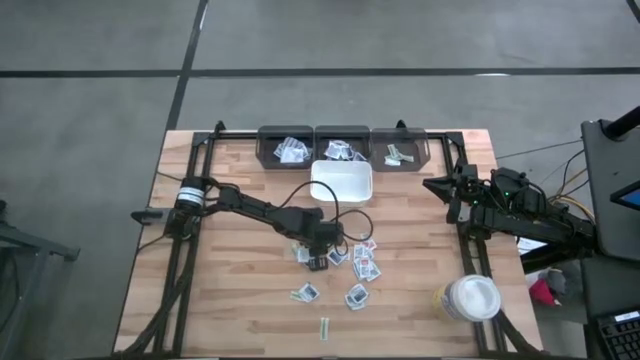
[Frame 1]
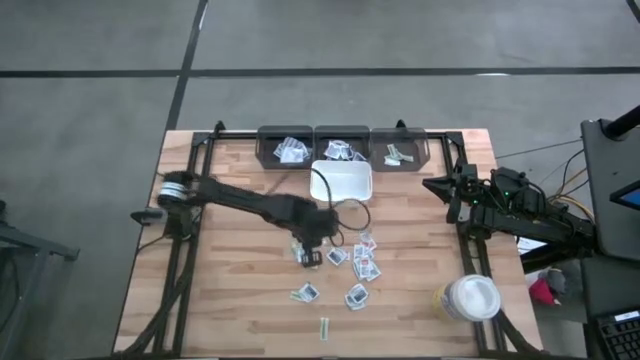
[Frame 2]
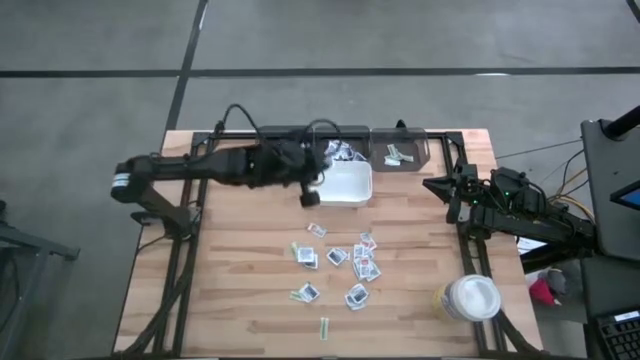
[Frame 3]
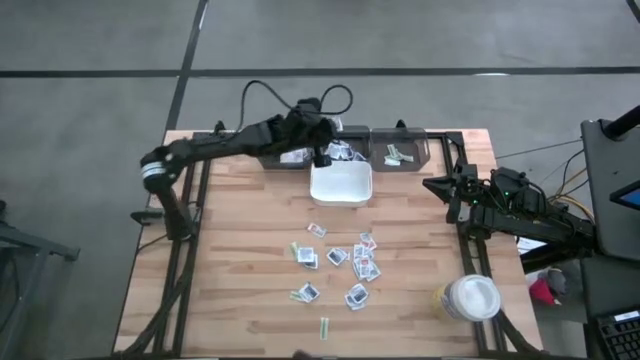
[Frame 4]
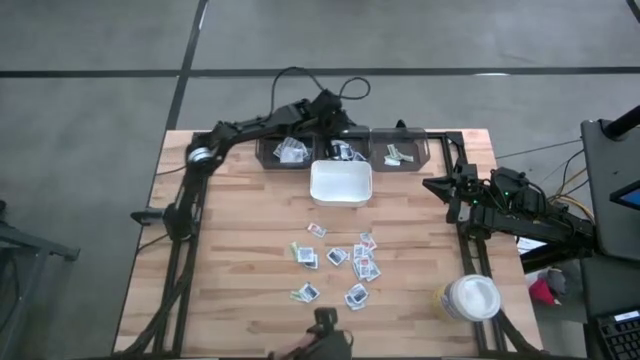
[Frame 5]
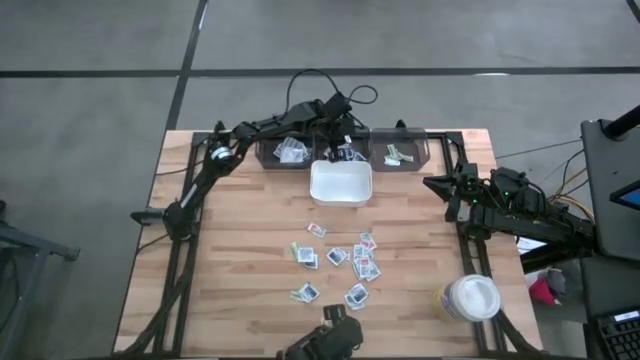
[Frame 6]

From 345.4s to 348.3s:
Task: Pick & Place First Aid Supplies
Put the blue alcohol pad into the middle gray bin

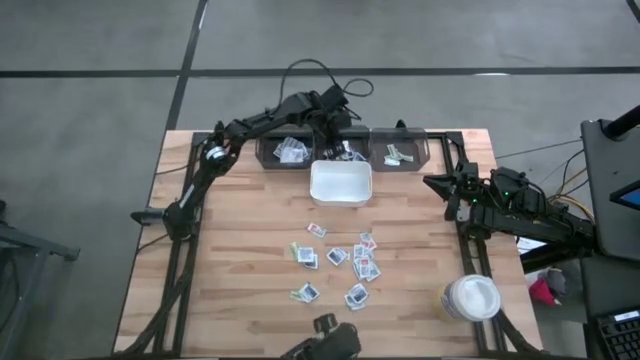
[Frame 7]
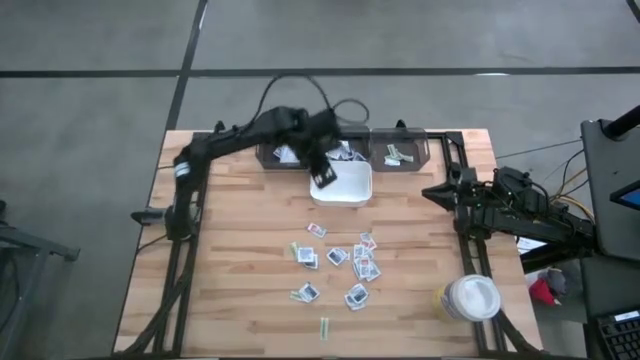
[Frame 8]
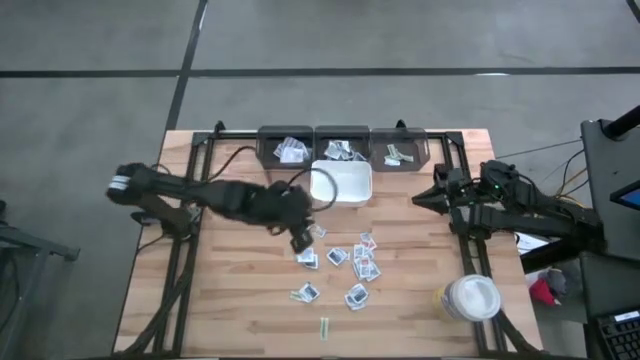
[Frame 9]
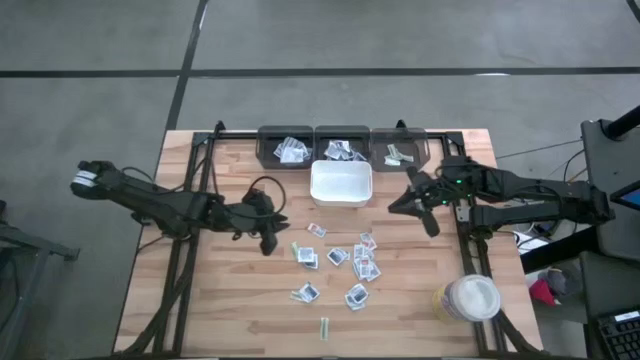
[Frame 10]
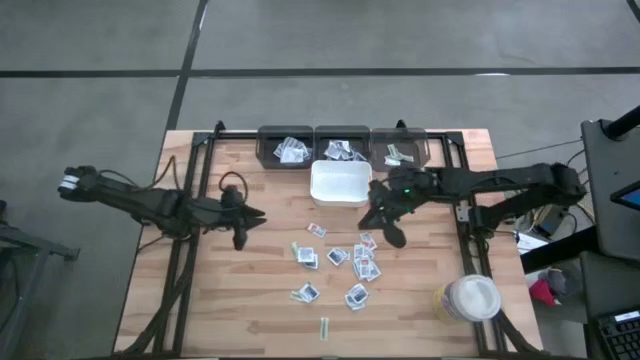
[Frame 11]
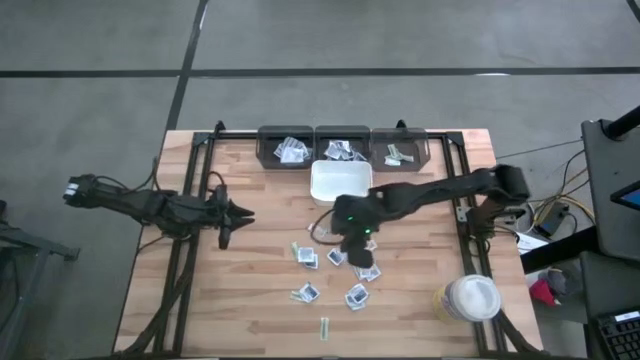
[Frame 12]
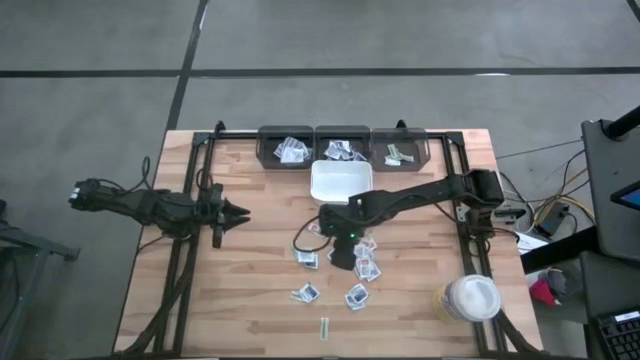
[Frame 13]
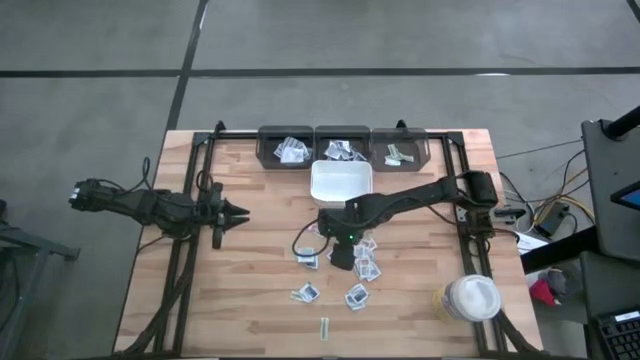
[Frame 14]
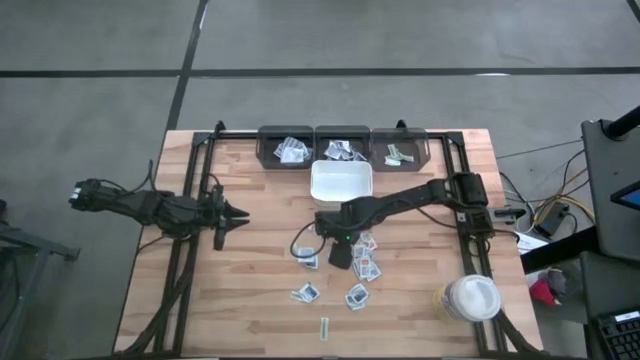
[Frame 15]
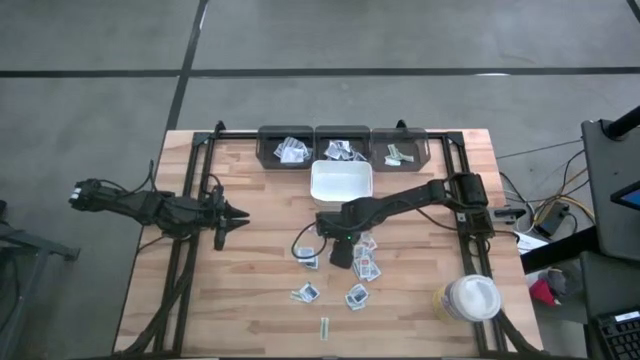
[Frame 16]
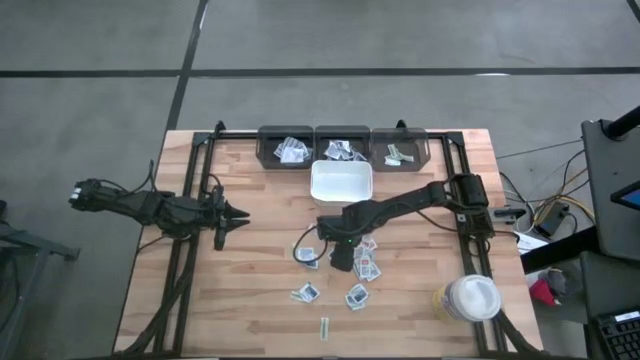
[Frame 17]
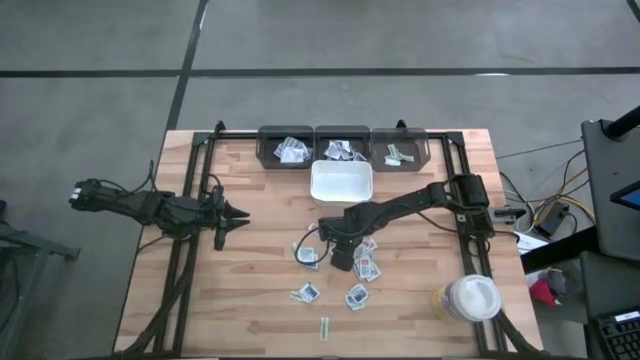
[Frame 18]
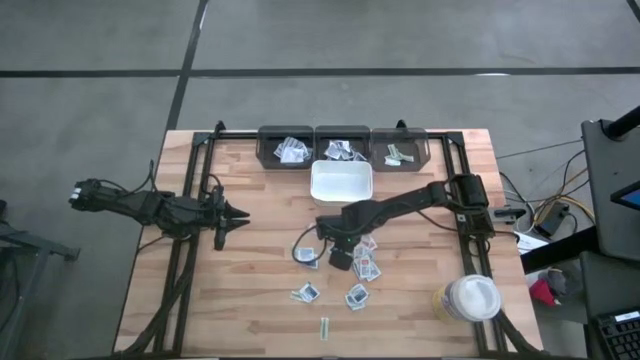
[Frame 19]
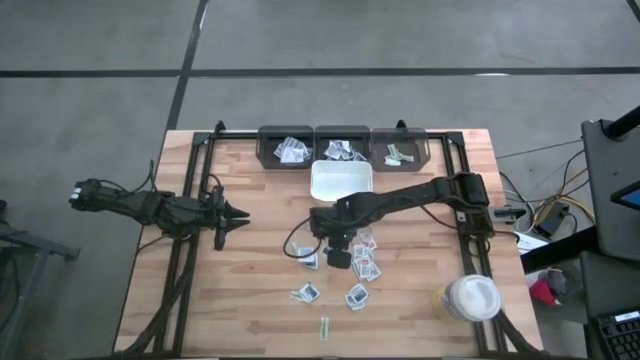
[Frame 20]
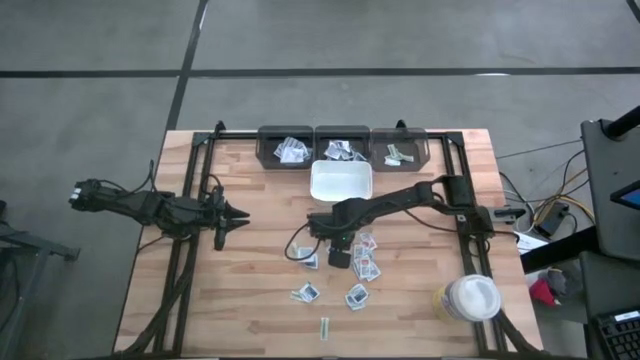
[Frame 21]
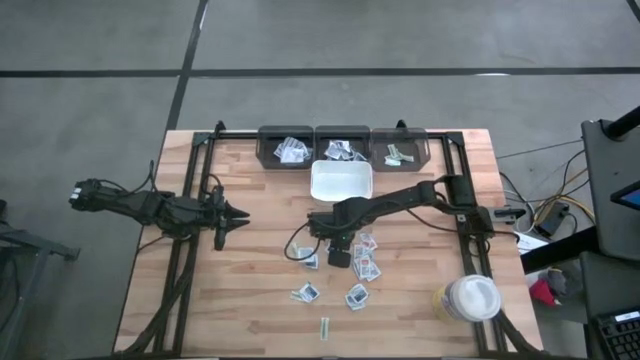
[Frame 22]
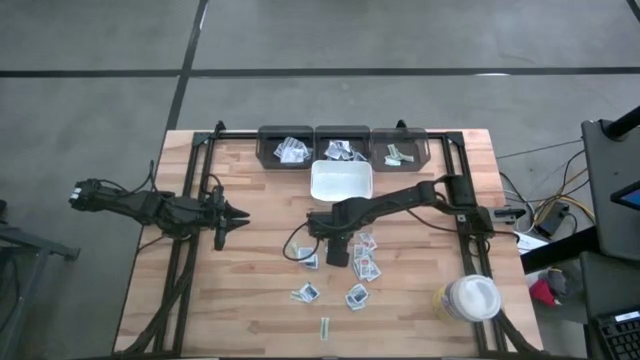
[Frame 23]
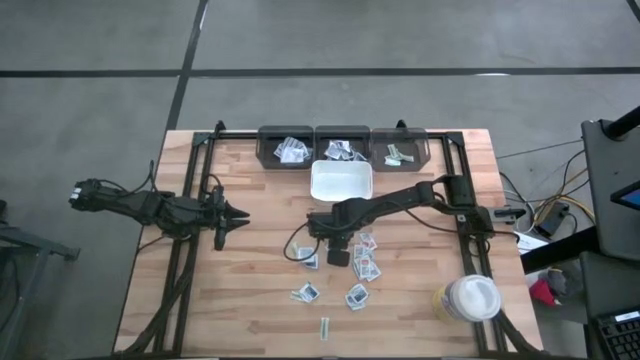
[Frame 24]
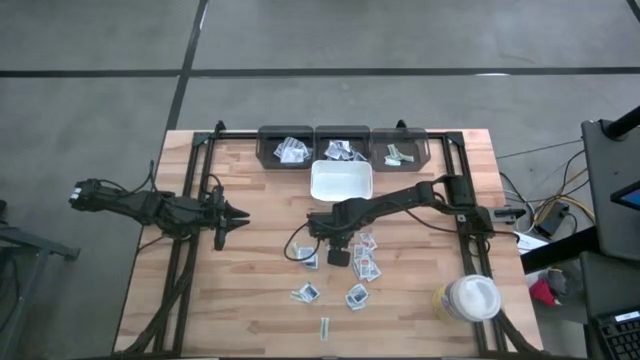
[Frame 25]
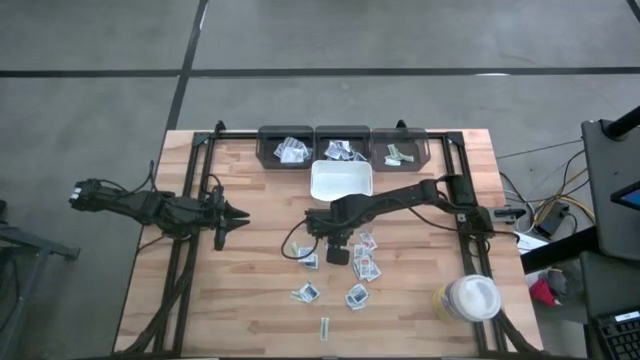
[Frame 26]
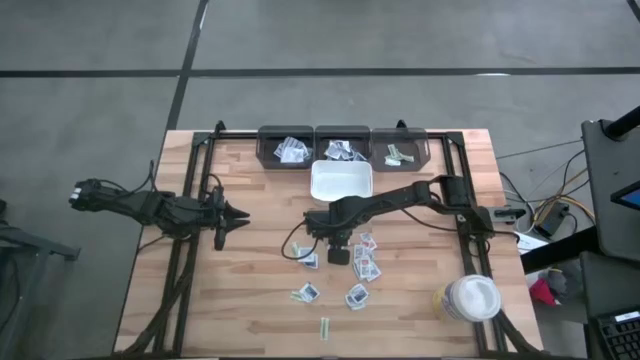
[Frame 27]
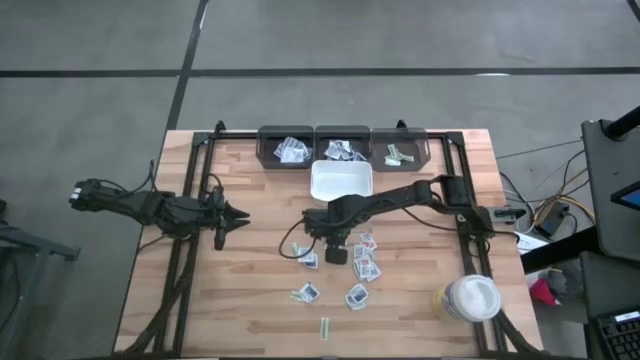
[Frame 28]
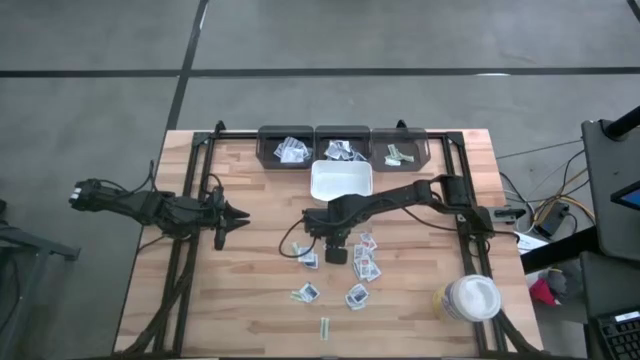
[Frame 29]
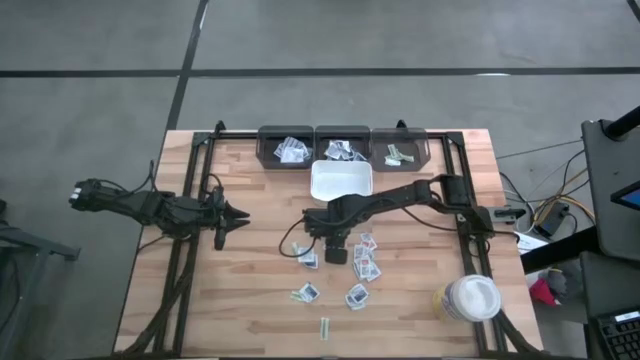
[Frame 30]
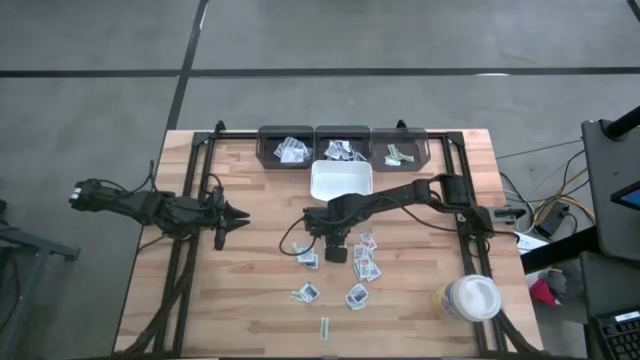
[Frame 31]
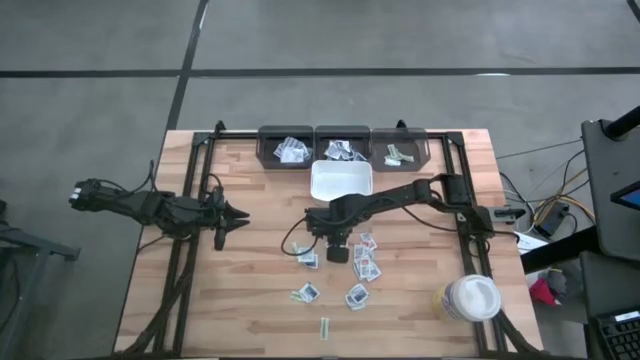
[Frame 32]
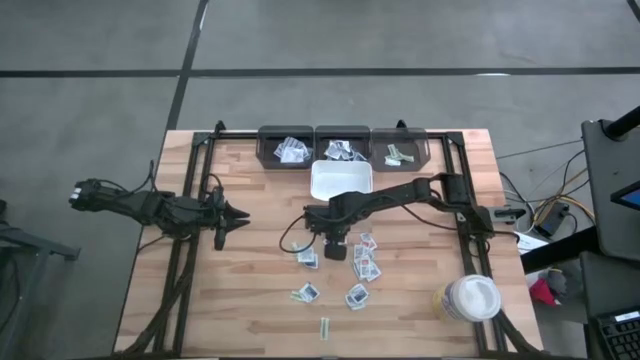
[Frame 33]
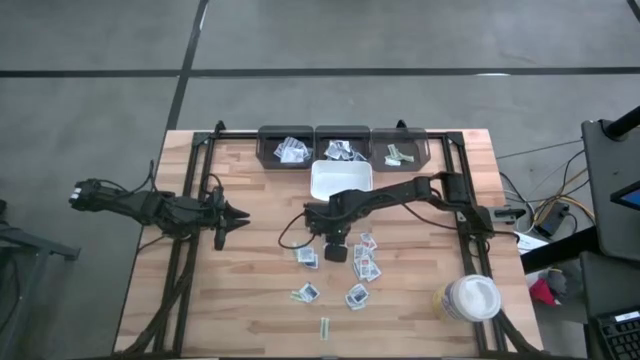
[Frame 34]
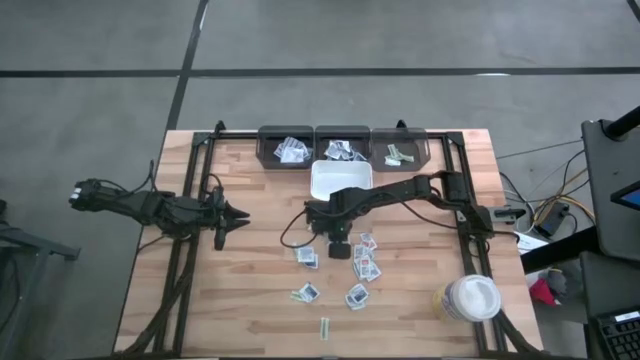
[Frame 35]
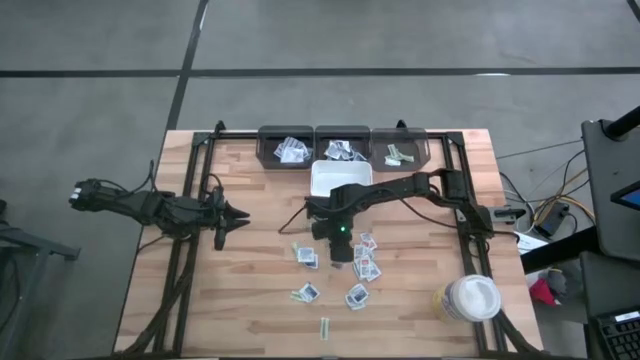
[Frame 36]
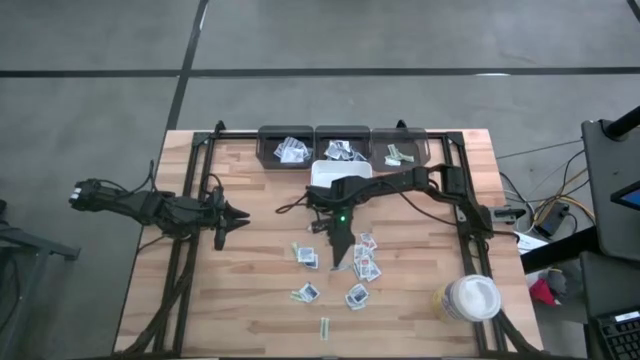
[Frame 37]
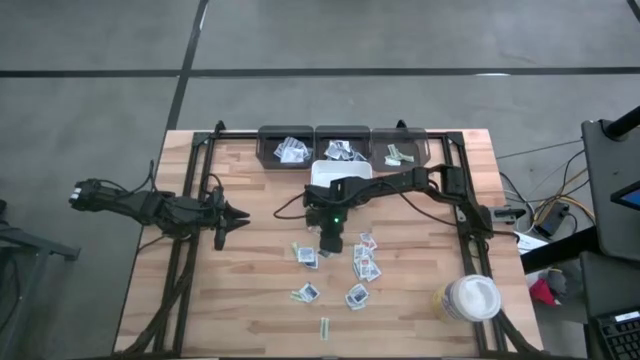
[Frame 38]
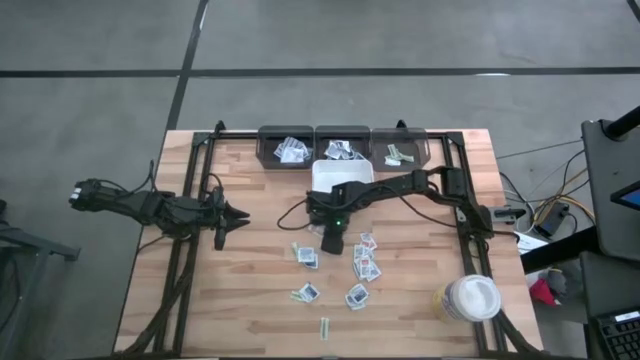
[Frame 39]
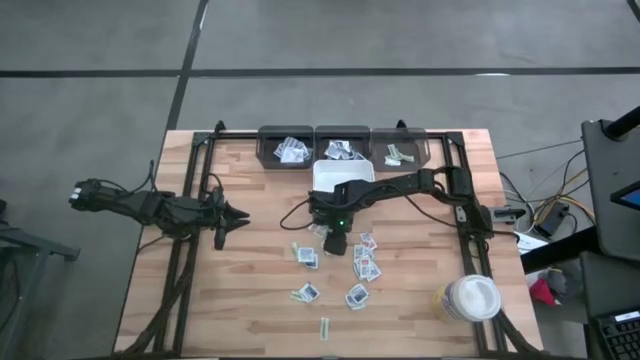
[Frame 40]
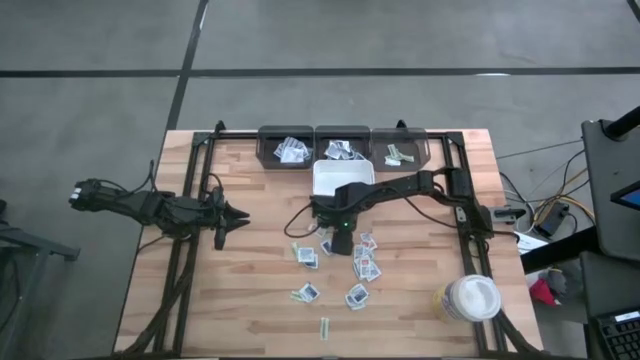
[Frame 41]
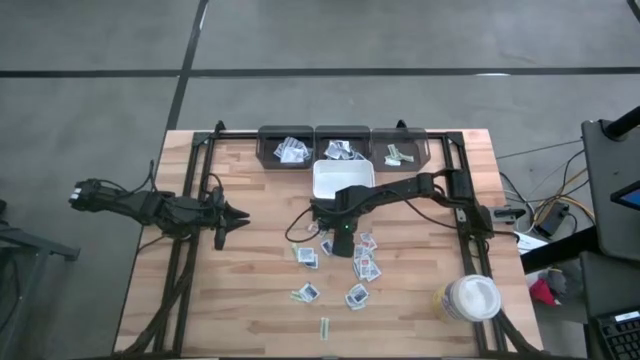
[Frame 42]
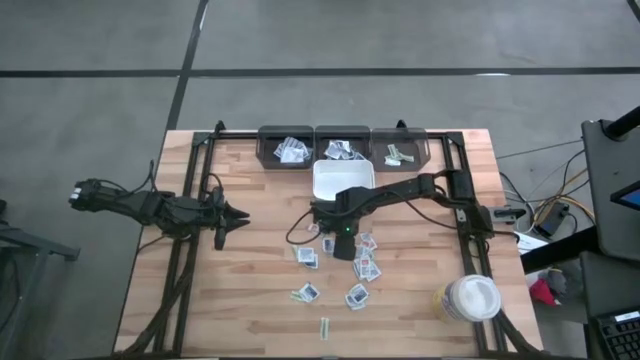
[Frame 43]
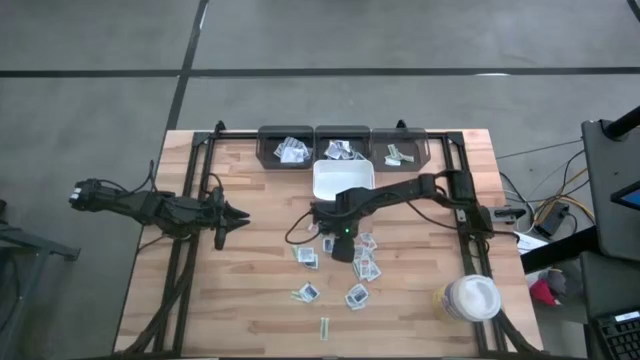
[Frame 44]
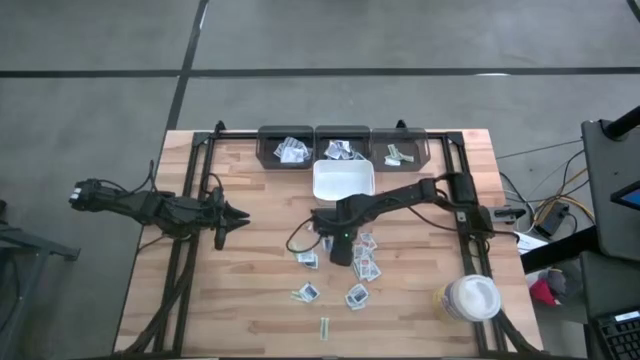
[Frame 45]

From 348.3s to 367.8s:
Put the blue alcohol pad into the middle gray bin
